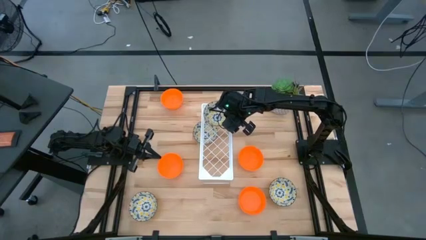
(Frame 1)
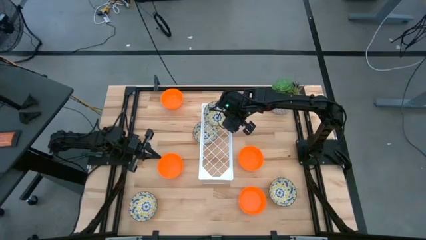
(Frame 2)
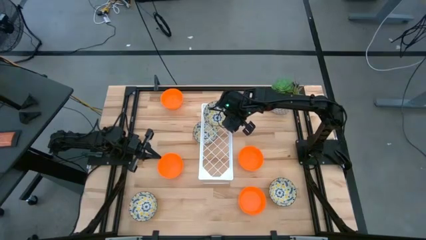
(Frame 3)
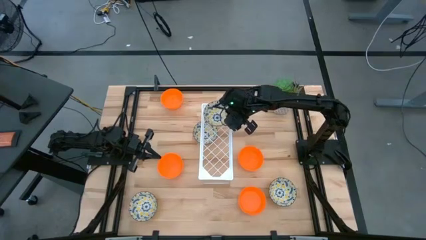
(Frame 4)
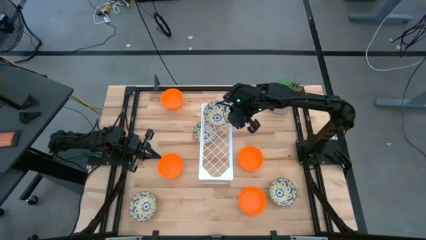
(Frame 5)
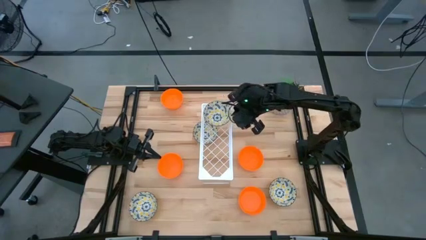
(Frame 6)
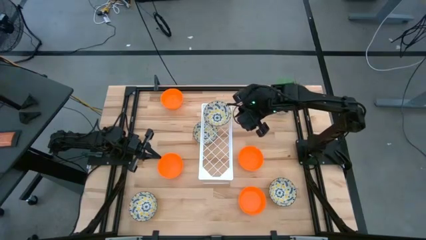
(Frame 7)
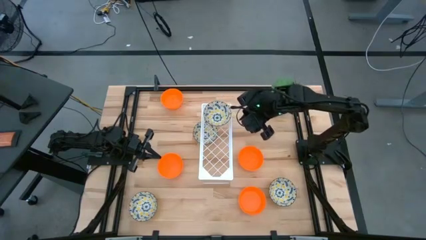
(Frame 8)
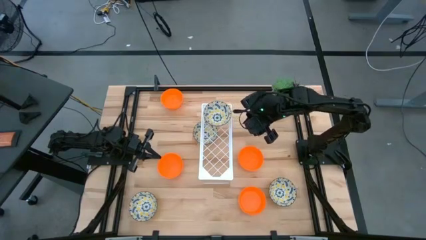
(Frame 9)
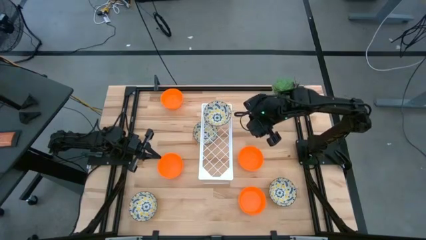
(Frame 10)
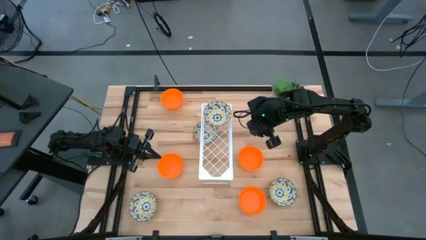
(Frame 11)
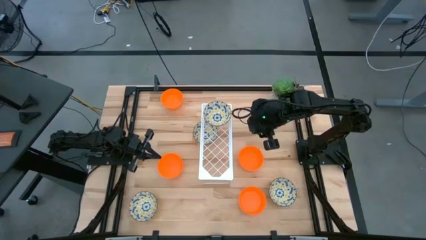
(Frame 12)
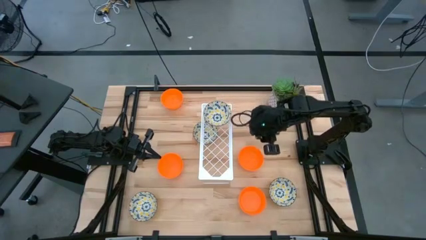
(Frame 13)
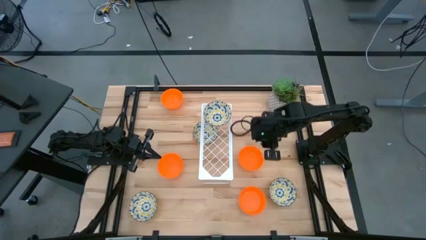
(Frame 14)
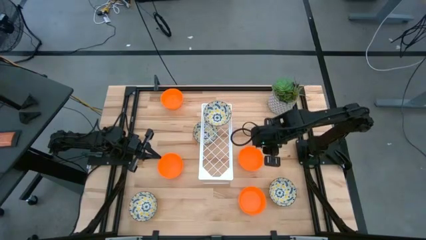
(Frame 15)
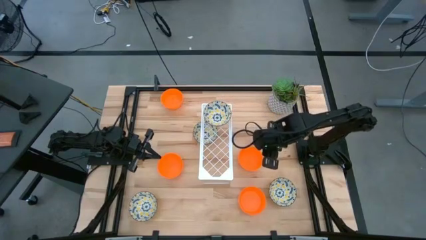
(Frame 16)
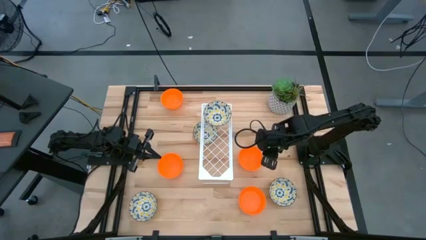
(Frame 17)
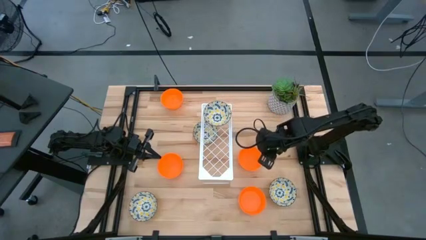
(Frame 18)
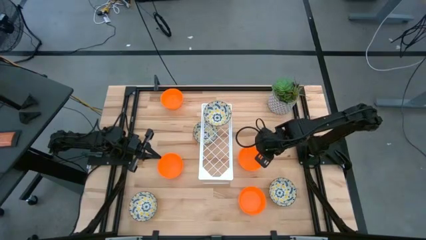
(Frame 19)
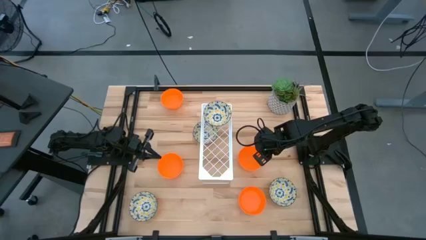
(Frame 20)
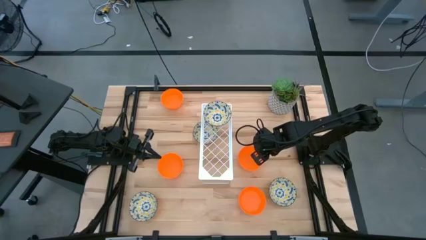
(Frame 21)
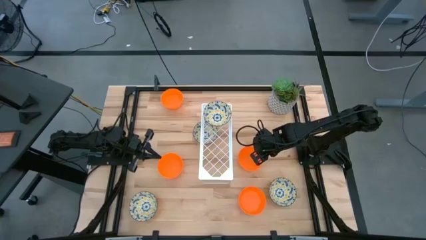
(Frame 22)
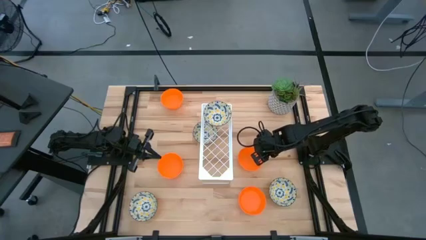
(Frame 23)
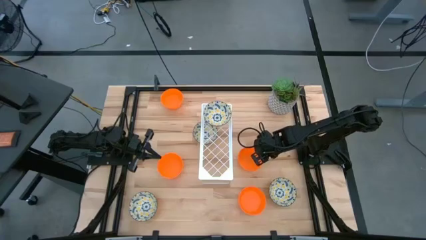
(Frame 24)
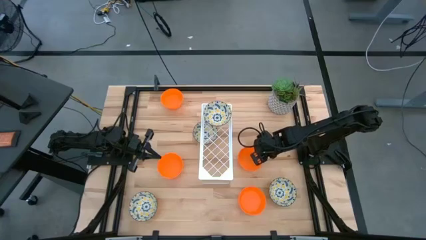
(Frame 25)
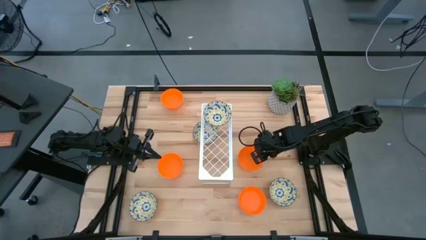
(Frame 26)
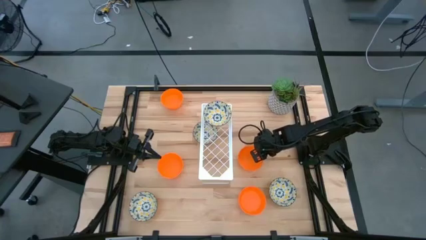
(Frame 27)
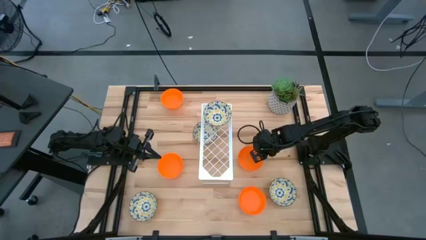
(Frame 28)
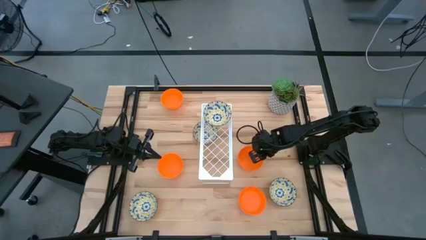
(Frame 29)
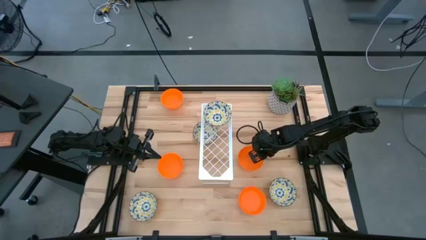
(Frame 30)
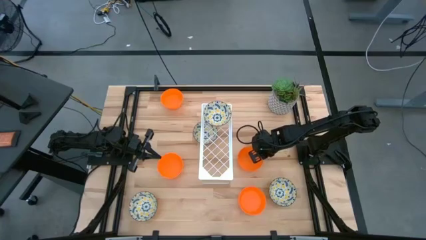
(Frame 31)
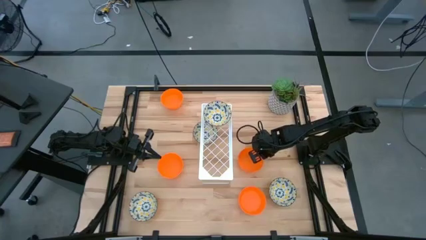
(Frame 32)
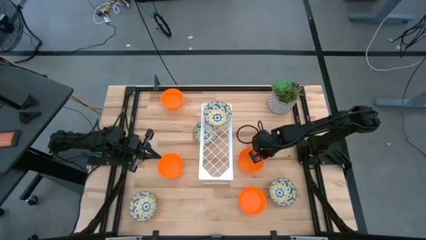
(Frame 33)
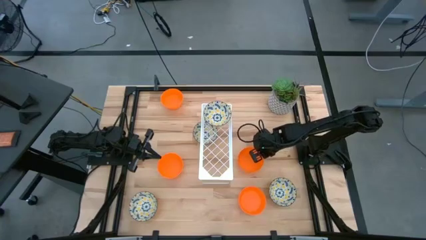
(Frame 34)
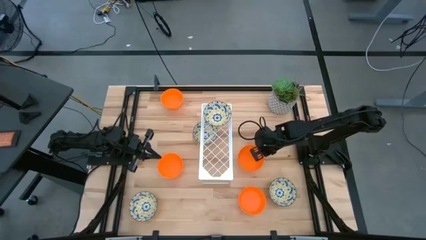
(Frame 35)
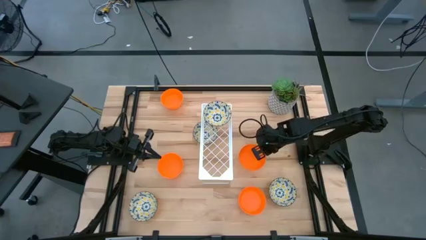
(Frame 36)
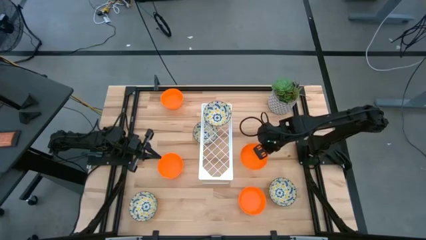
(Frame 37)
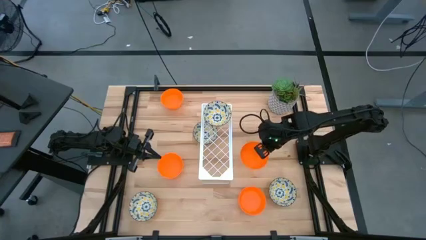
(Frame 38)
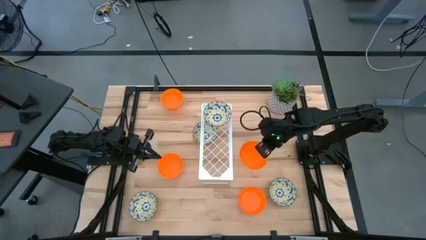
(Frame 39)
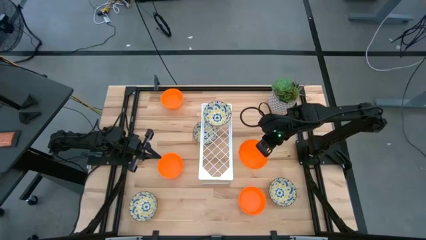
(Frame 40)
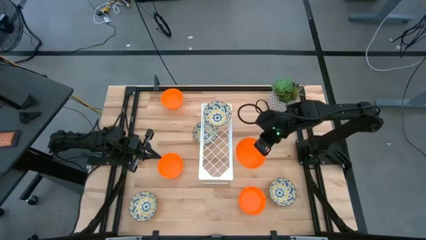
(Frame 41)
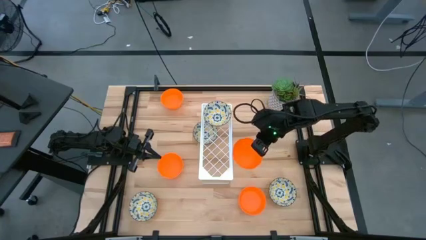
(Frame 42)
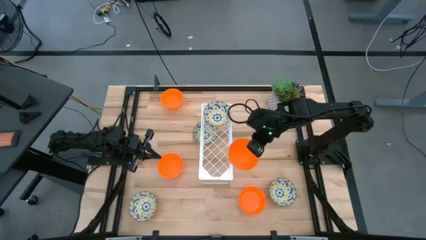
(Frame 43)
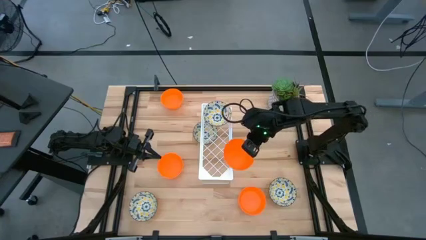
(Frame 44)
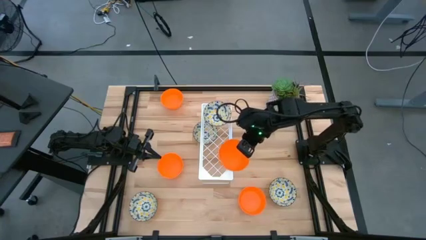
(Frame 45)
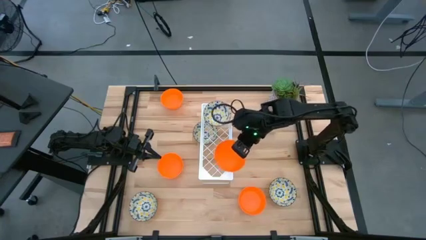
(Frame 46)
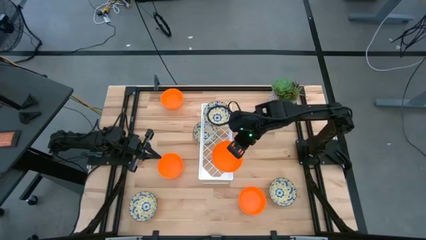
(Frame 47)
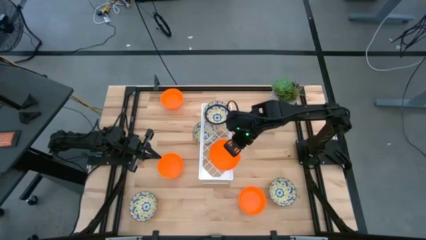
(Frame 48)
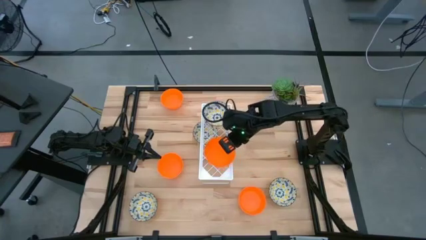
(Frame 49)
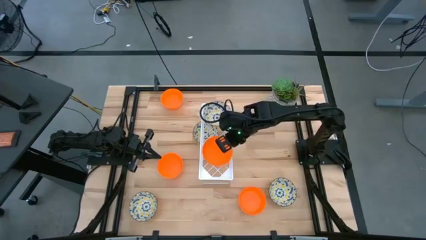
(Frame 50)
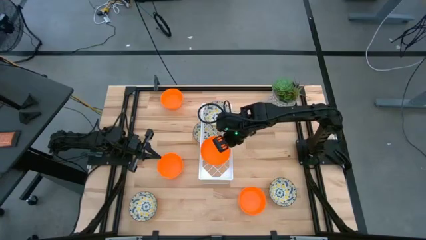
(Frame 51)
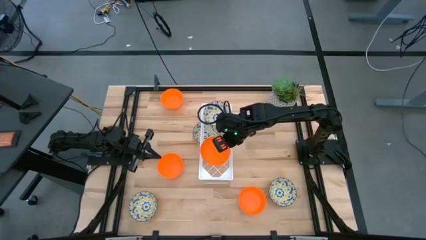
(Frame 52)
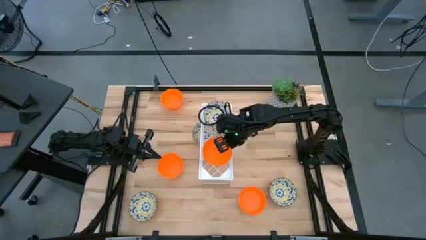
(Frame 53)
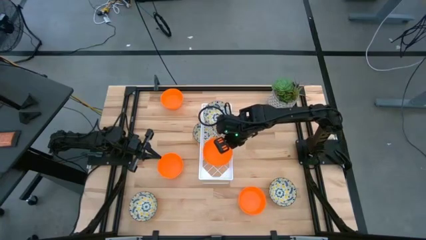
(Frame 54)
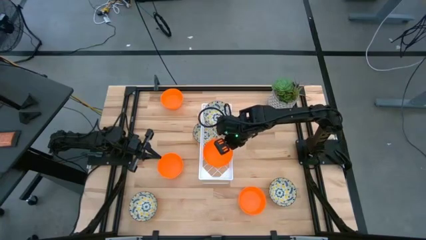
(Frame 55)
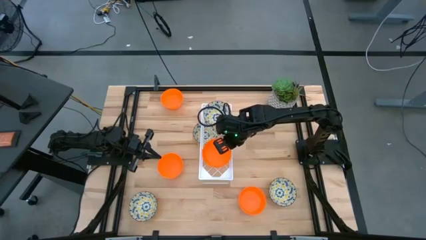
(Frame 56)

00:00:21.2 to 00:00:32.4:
Task: Pick & Place Mini bowls
Put the orange bowl on the shelf

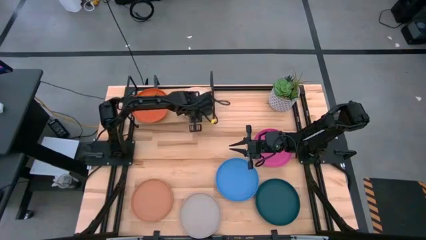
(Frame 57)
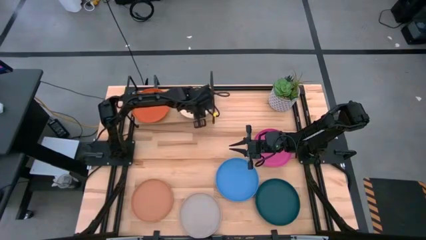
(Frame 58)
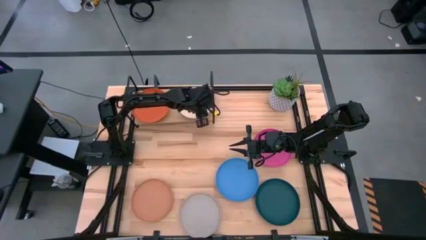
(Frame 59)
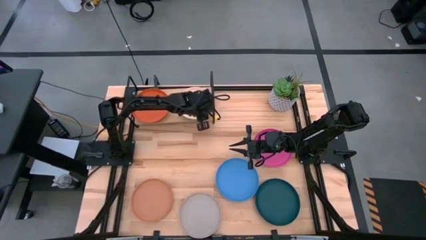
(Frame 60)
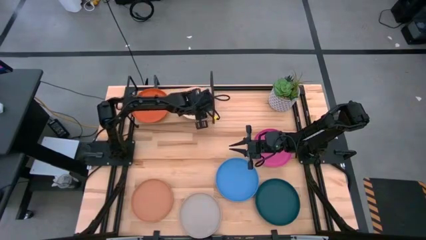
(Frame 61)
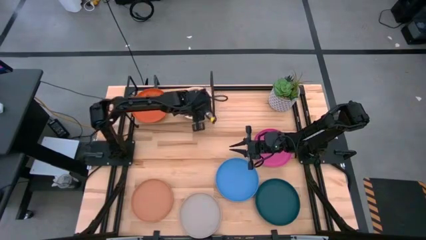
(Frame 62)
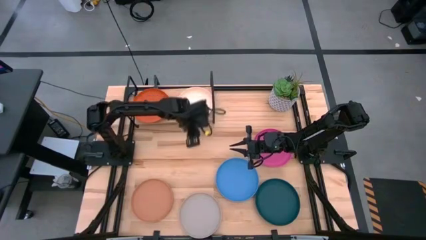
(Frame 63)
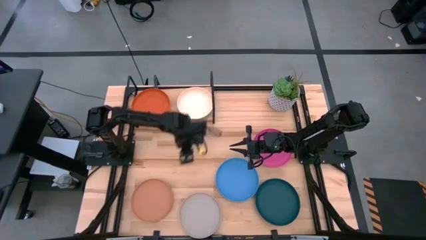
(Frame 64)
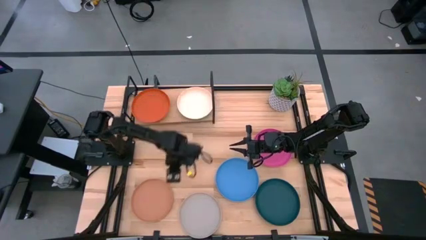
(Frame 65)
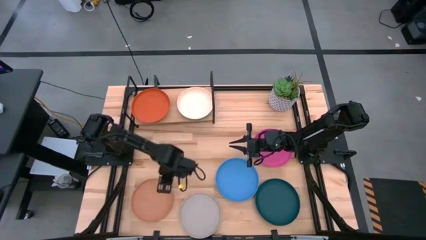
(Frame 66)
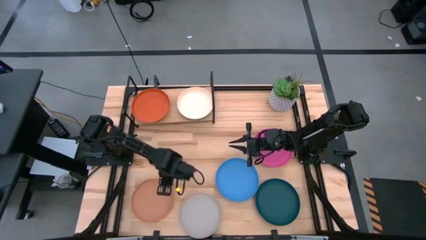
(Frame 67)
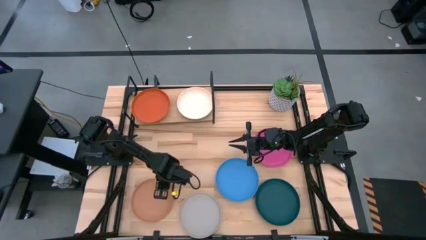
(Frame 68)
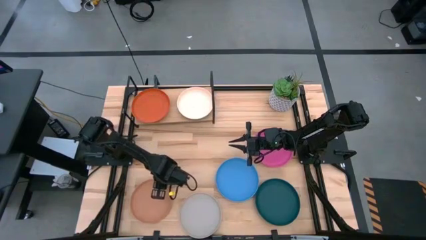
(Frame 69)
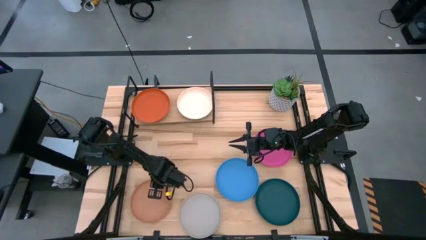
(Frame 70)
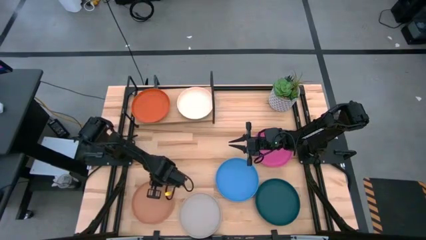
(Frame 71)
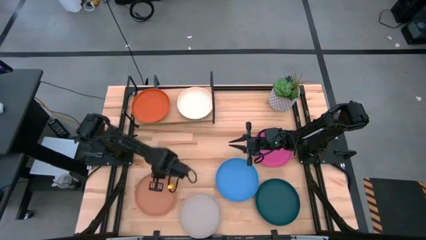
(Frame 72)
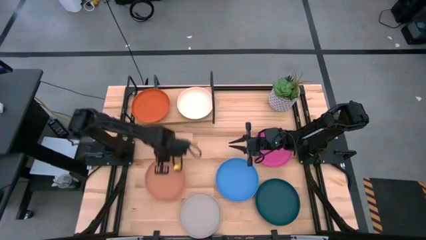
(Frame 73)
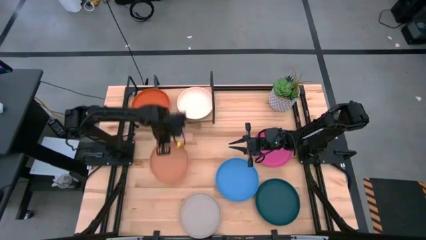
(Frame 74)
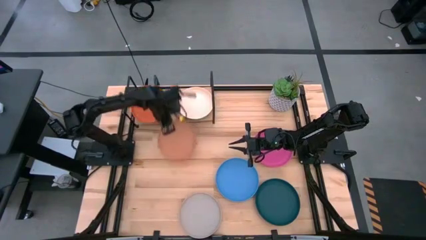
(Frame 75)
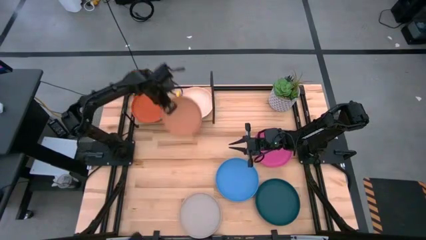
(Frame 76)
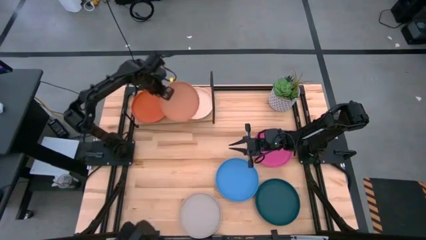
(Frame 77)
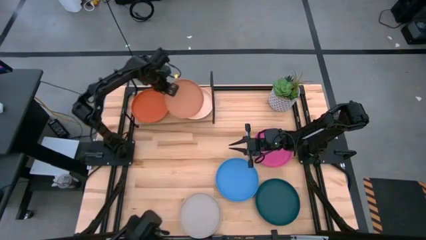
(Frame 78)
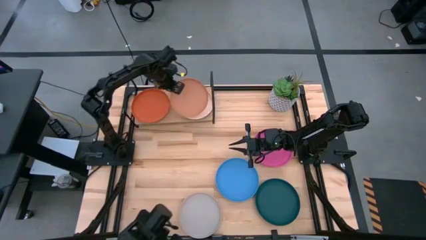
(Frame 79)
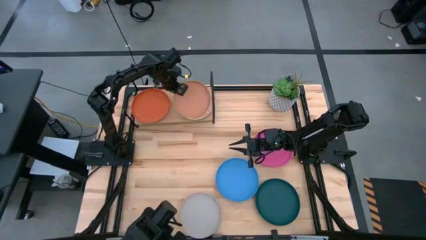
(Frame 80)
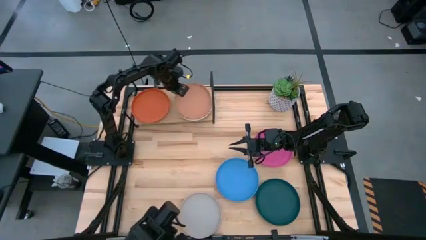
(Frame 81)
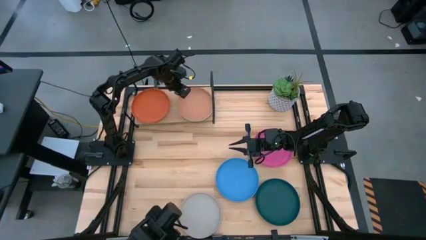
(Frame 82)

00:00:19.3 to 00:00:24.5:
Task: Place and stack plates onto a shelf
Stack the brown plate on top of the peach plate on the shelf
